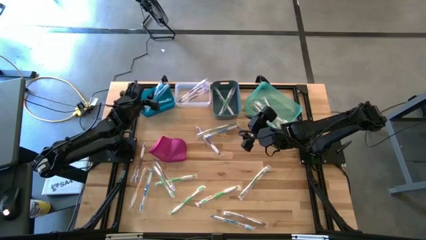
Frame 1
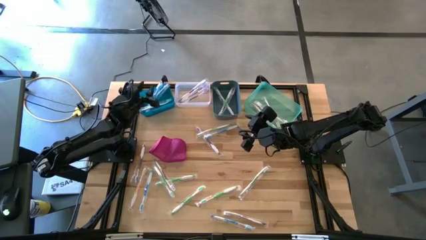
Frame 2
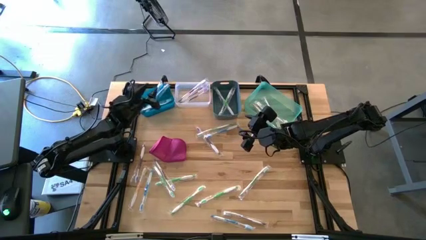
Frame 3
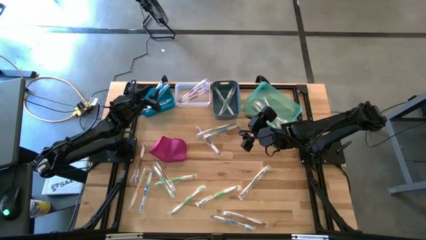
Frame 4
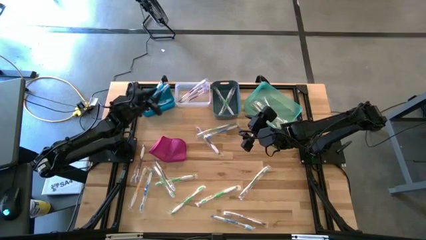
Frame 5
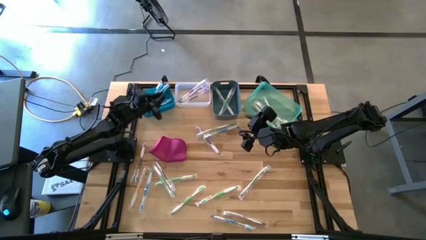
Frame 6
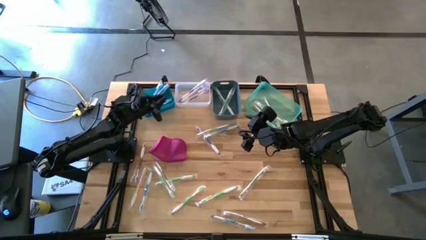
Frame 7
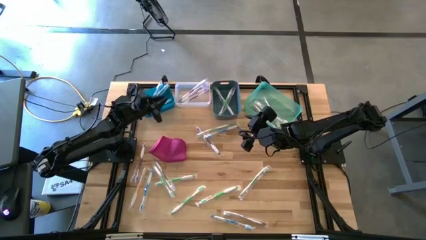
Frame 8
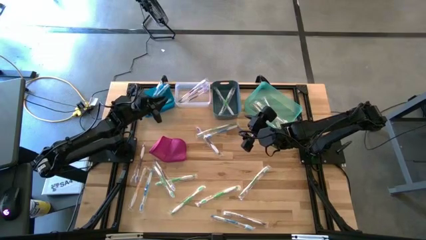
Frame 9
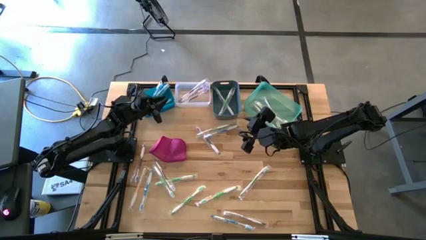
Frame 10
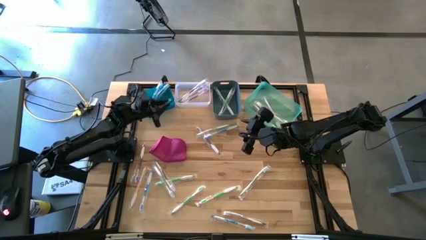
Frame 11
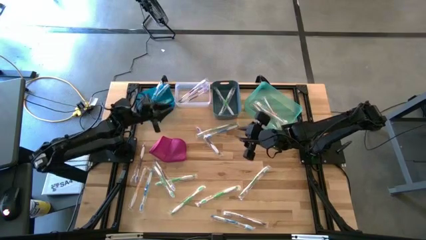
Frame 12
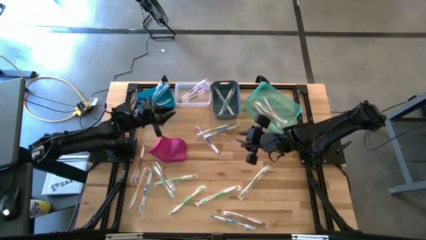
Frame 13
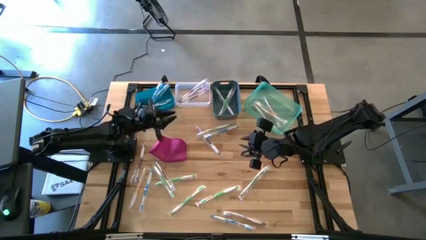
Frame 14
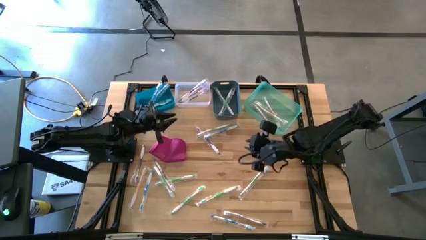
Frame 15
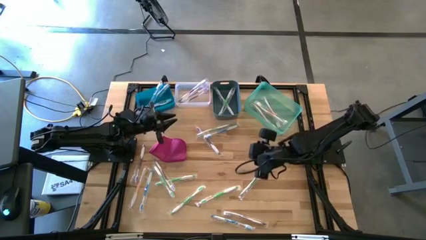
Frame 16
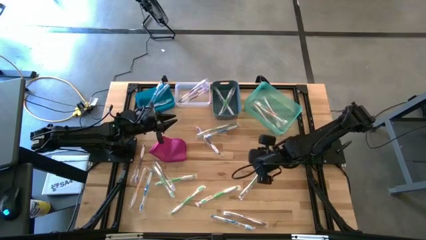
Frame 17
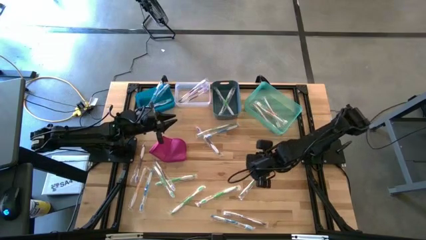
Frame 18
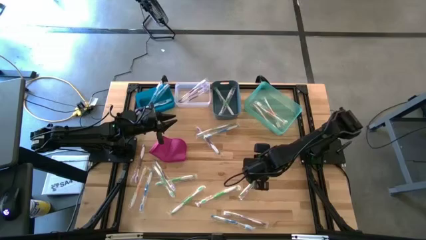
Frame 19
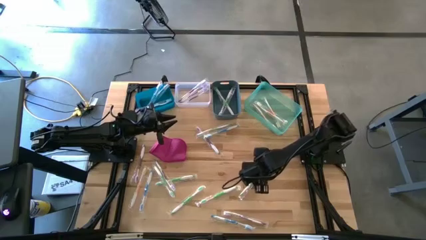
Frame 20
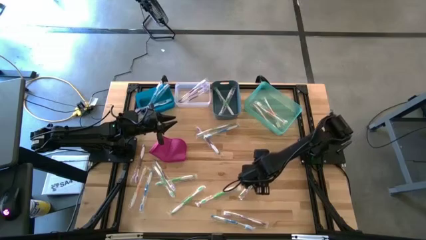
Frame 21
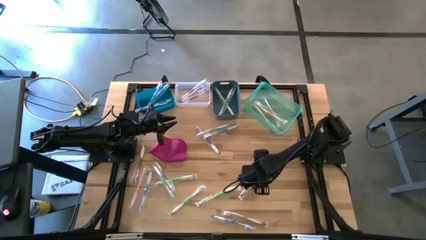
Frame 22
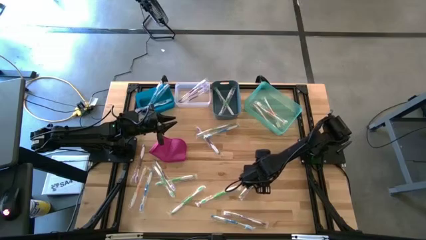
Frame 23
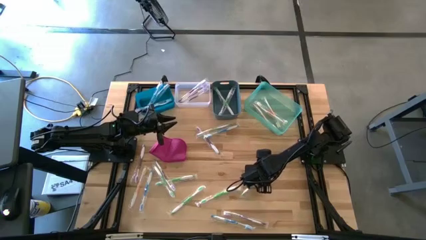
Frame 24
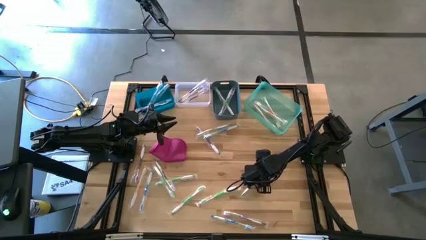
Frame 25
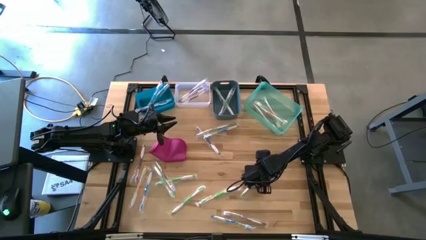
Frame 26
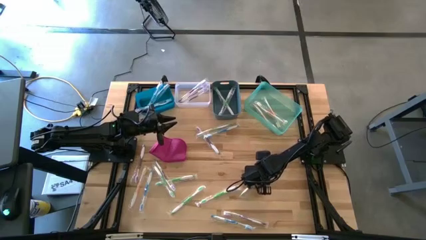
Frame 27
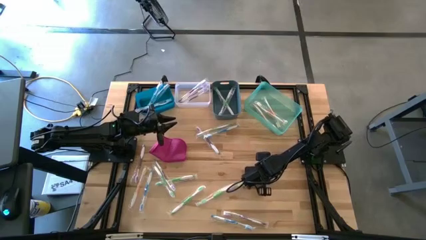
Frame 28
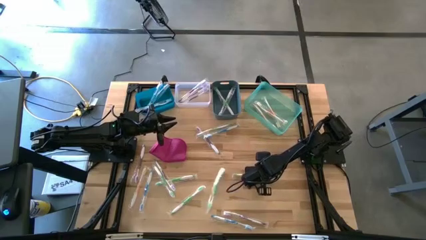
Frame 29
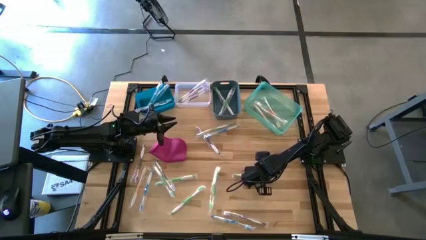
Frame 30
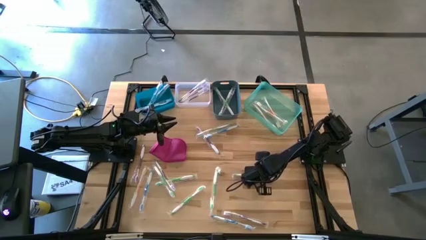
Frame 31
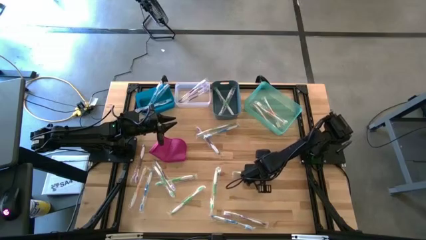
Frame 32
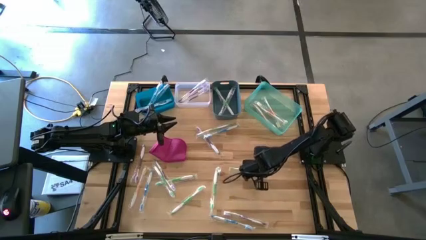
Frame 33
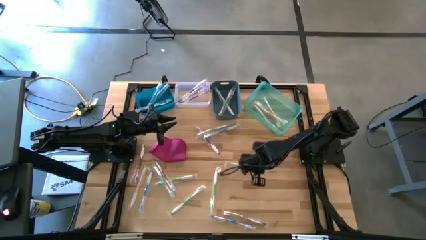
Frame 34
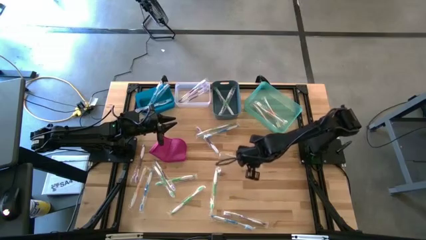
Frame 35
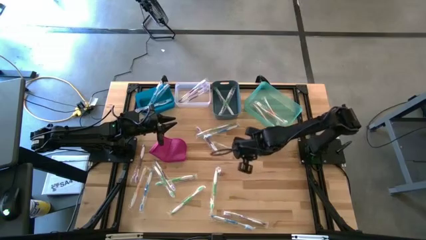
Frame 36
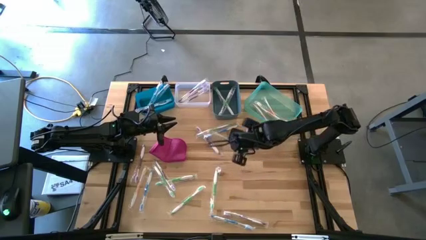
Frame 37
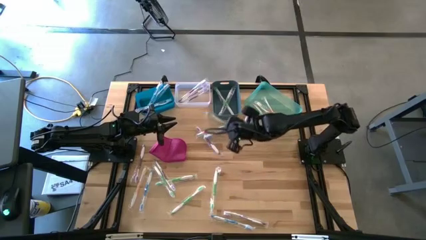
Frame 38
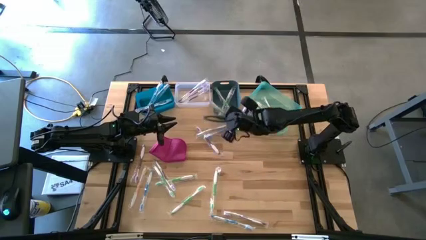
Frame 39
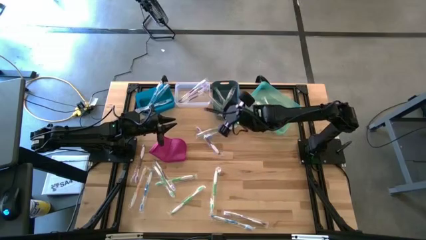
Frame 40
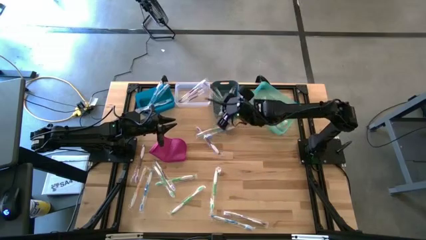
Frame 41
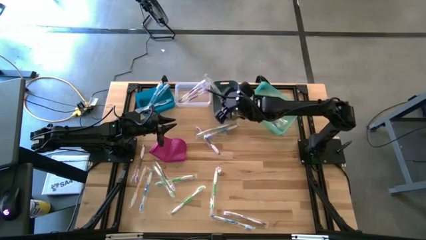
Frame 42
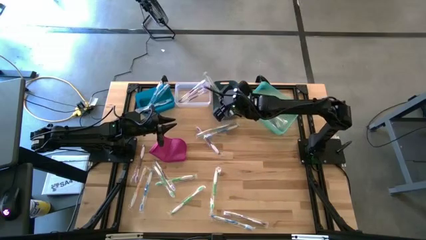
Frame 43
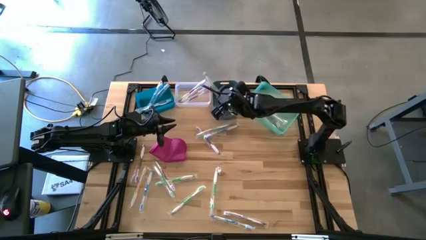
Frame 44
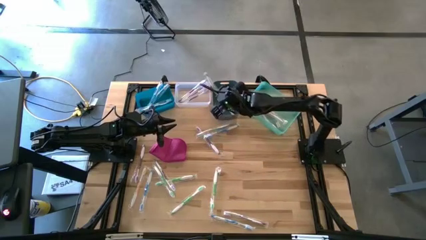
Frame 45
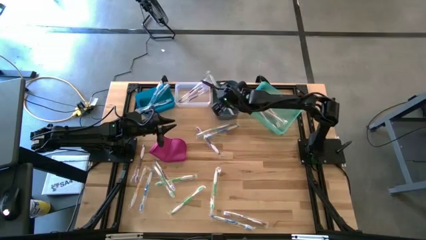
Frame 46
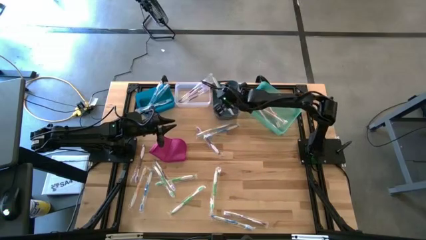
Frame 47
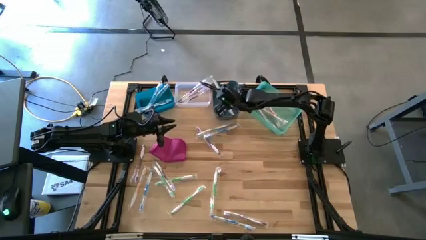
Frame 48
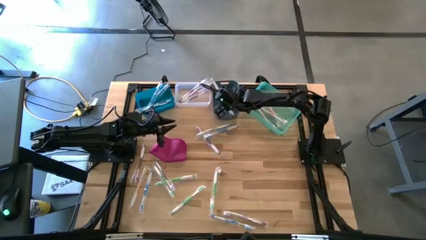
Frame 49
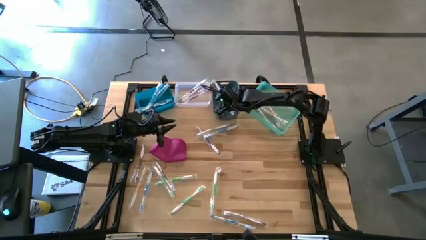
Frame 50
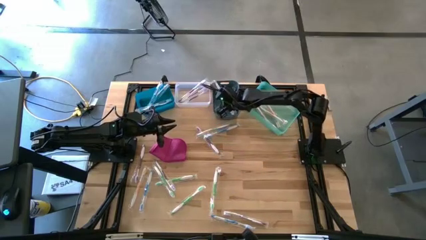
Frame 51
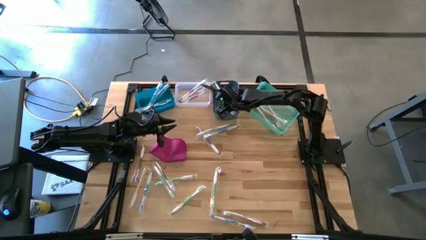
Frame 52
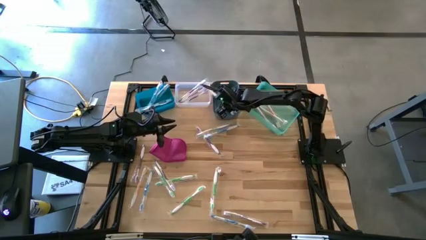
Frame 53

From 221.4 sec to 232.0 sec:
Task: Pick & Place Toothbrushes
Put the green toothbrush into the dark blue bin

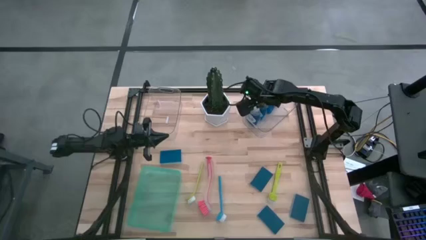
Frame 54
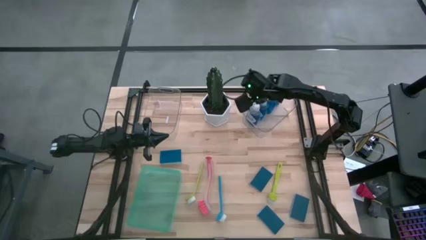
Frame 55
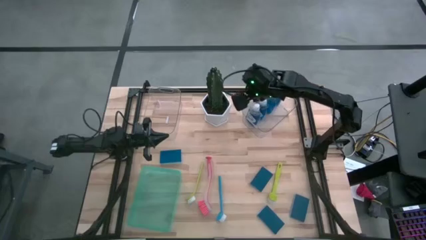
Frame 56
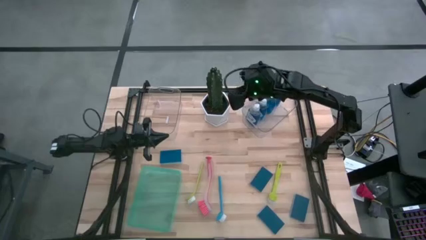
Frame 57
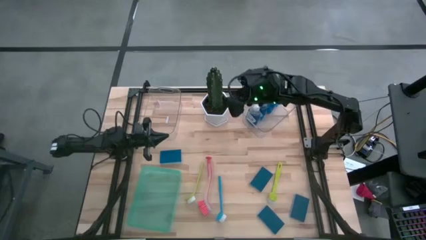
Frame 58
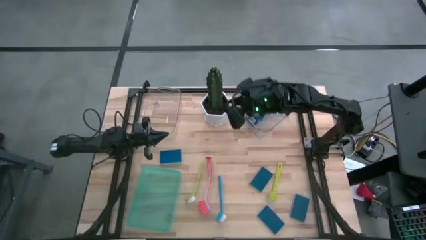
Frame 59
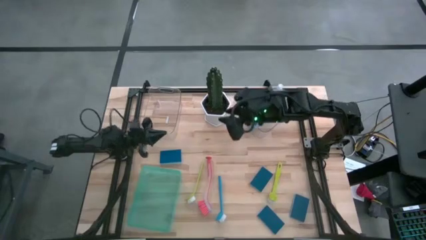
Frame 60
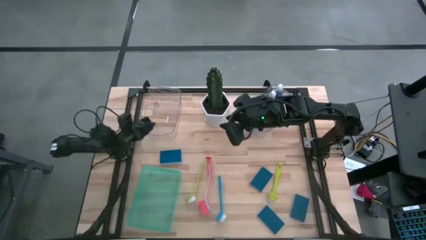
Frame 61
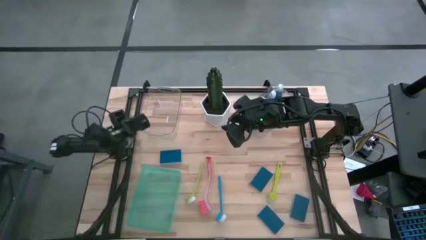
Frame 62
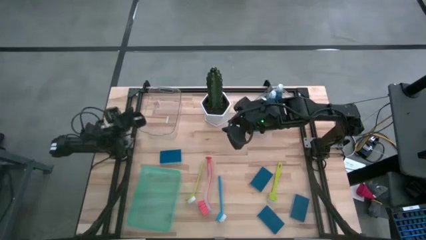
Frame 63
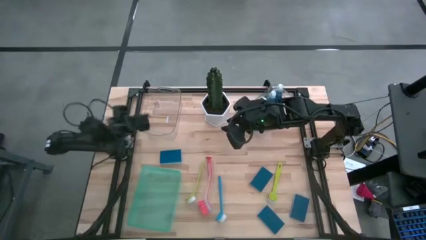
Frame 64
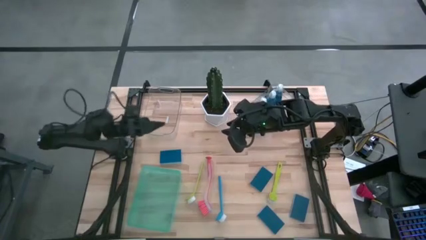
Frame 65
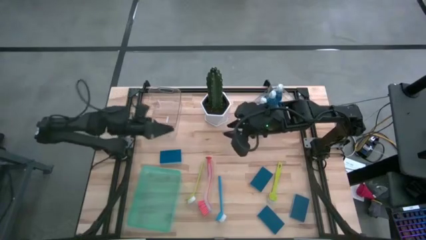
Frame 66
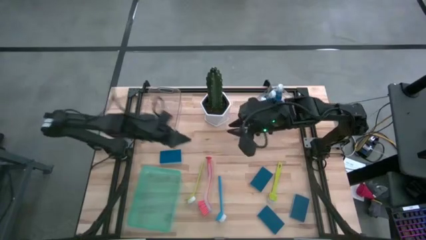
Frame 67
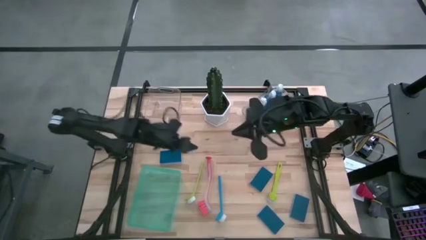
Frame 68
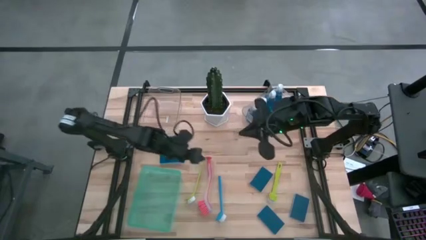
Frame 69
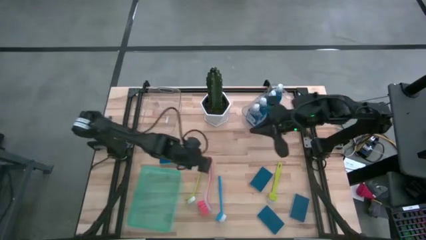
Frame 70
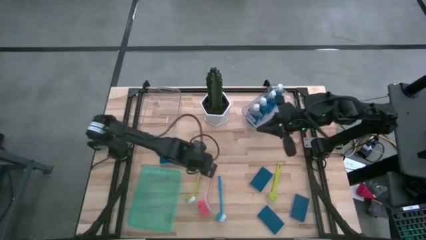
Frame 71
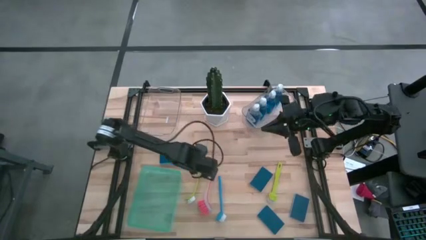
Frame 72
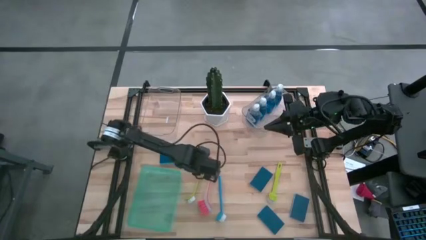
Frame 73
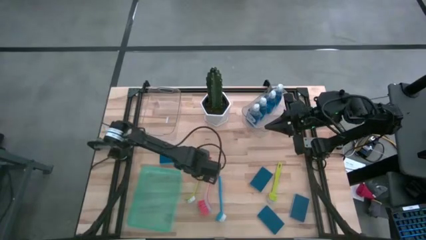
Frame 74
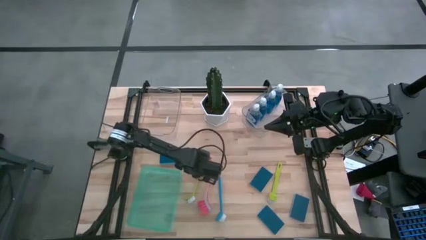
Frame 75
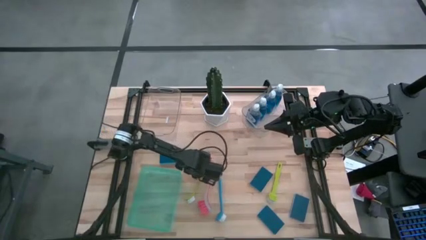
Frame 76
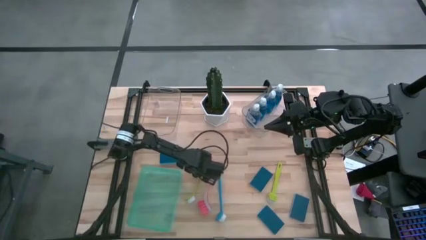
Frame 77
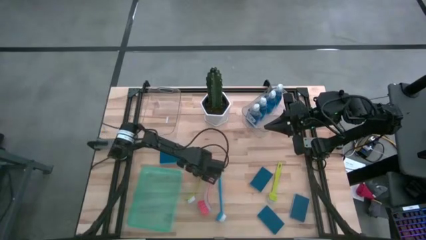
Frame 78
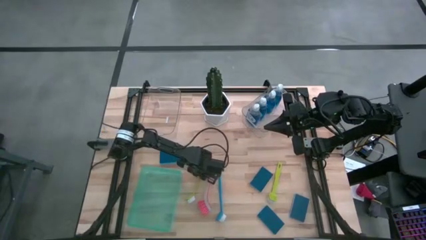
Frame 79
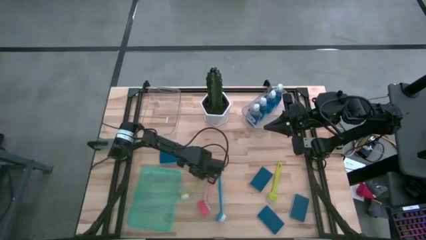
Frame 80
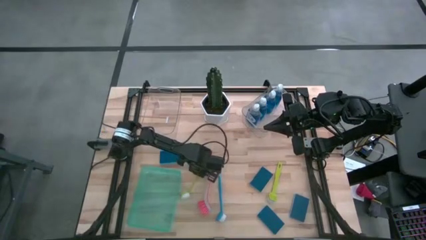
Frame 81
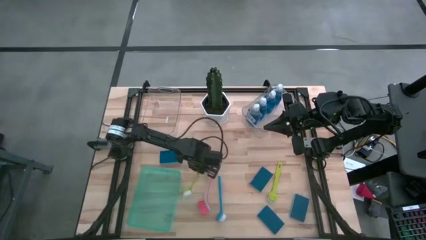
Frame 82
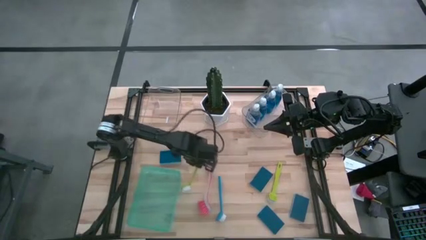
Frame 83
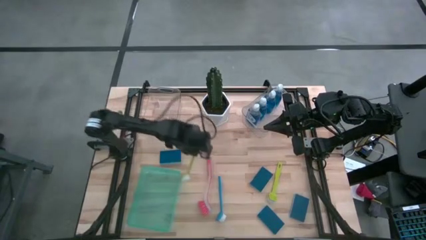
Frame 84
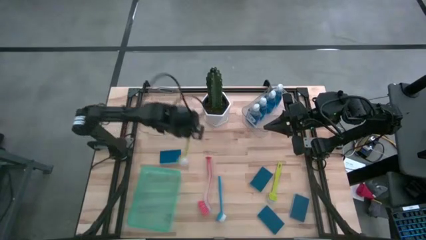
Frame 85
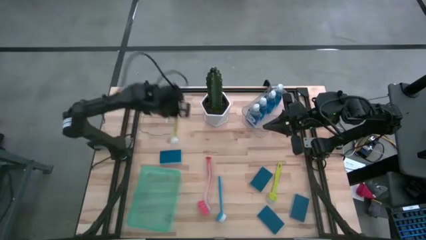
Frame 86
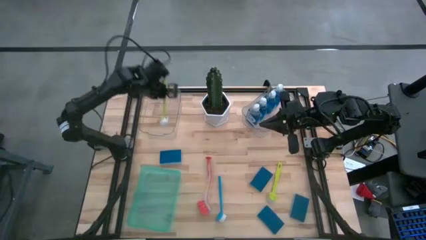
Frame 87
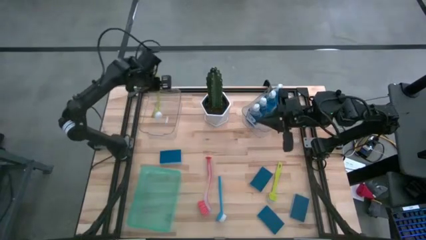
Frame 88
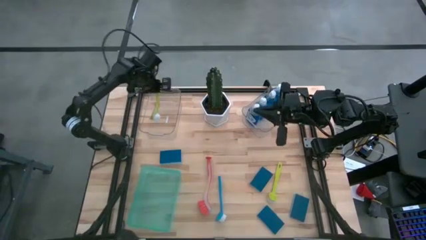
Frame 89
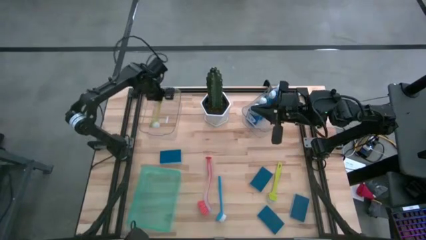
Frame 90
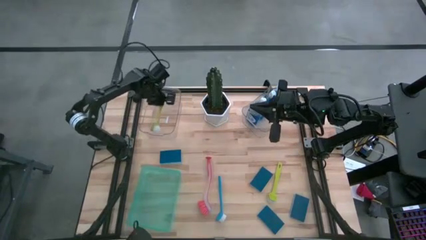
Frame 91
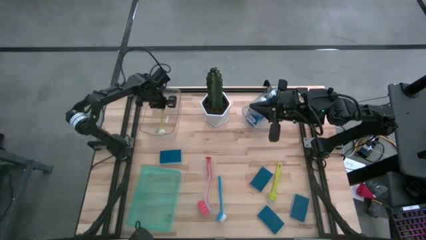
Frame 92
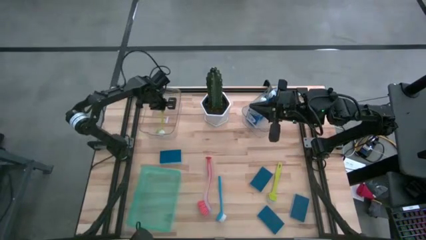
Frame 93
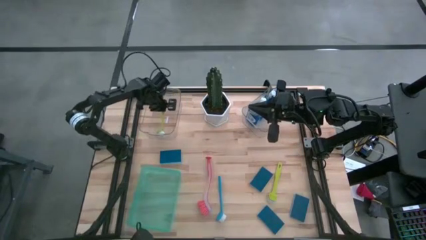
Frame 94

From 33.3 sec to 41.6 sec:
Task: Pick & Place Kitchen Sink Supplies
Put the left green dish brush into the left transparent bin
